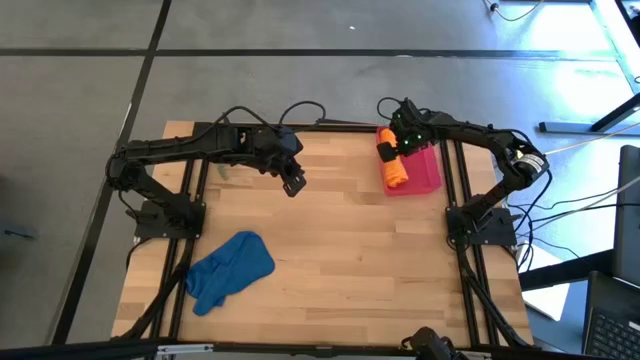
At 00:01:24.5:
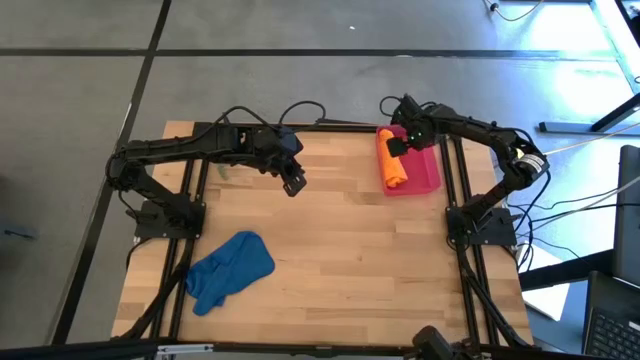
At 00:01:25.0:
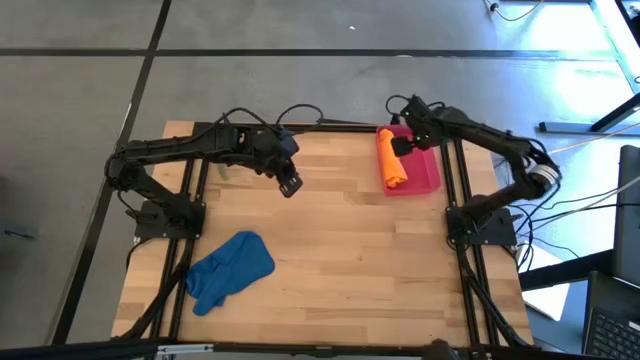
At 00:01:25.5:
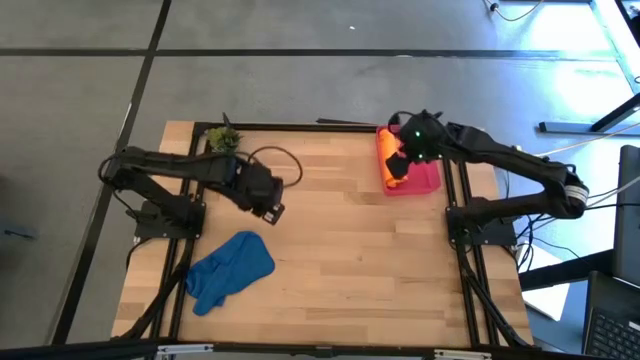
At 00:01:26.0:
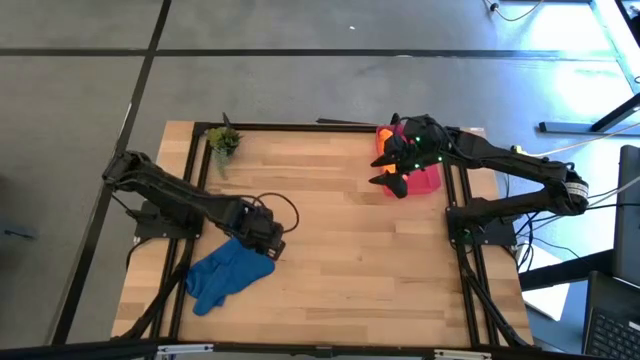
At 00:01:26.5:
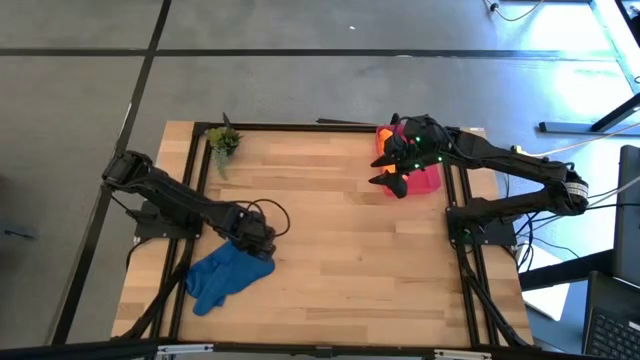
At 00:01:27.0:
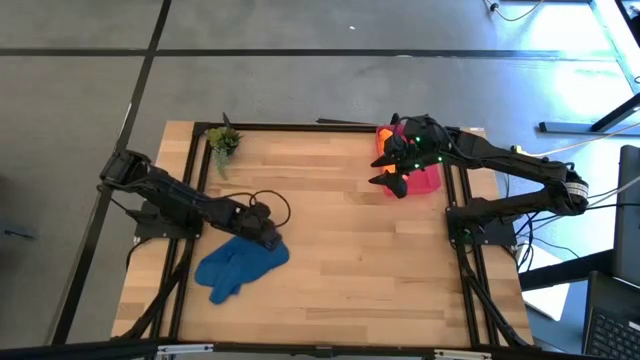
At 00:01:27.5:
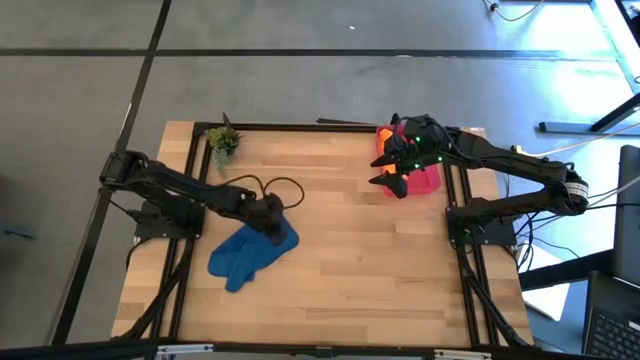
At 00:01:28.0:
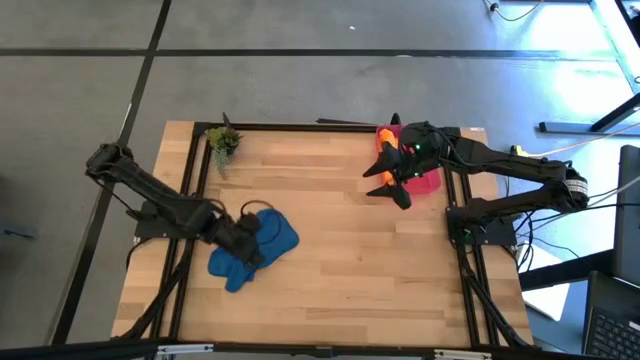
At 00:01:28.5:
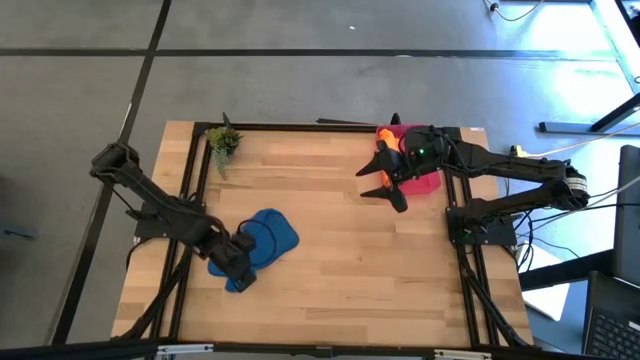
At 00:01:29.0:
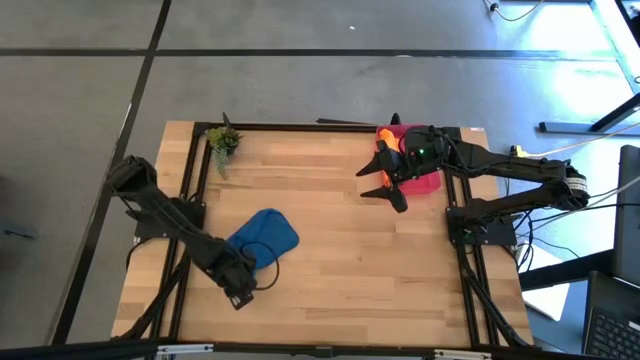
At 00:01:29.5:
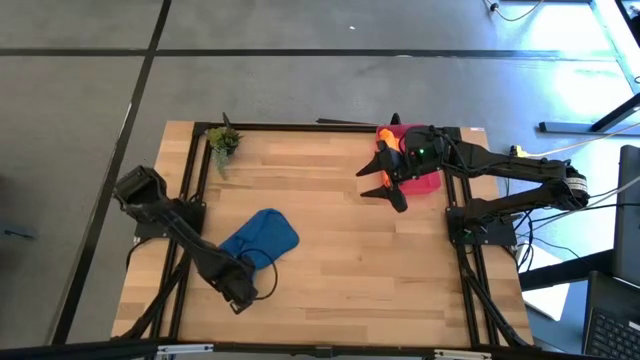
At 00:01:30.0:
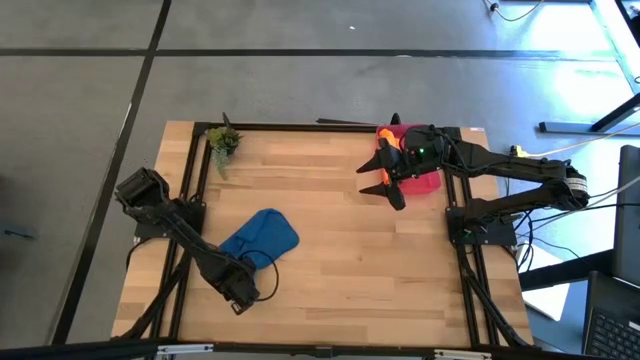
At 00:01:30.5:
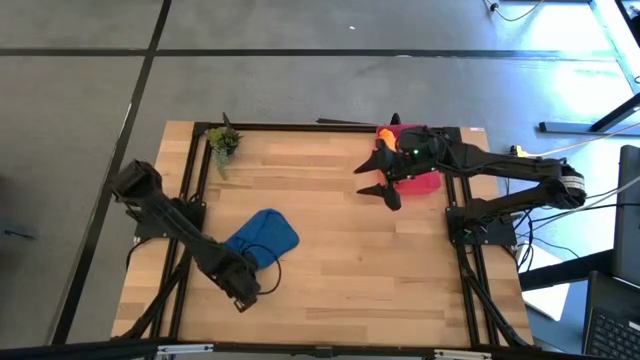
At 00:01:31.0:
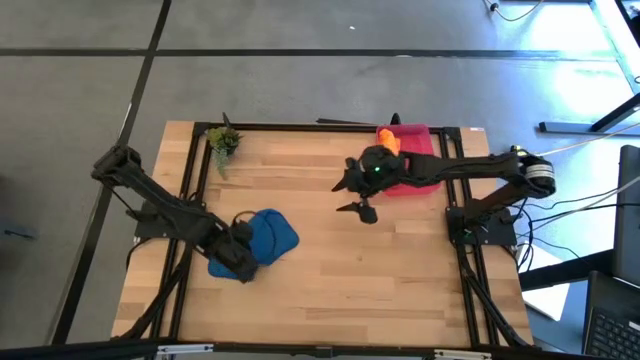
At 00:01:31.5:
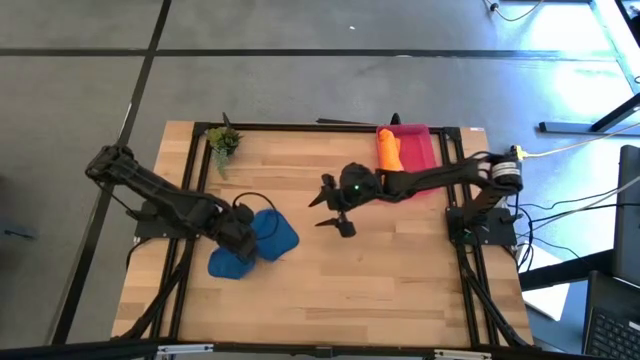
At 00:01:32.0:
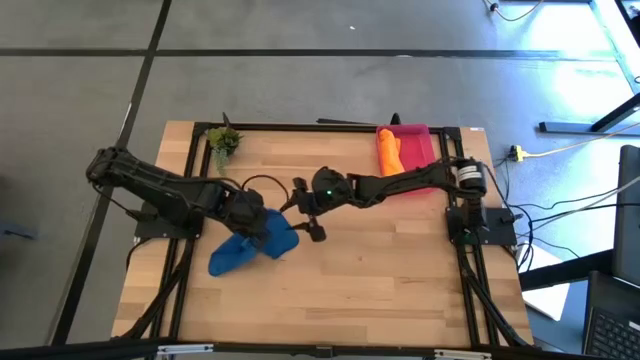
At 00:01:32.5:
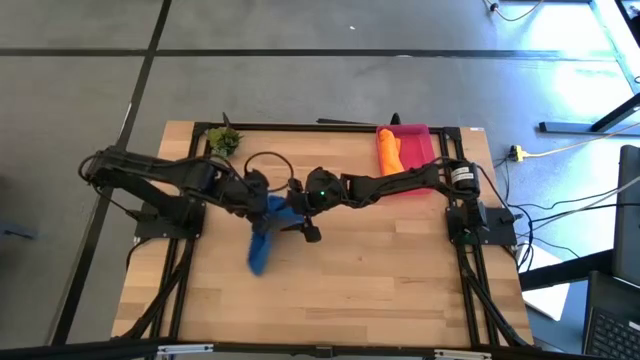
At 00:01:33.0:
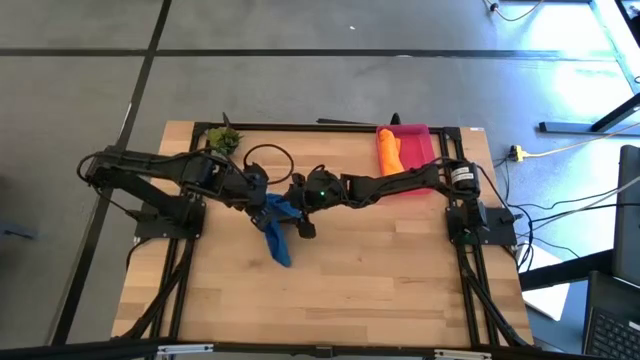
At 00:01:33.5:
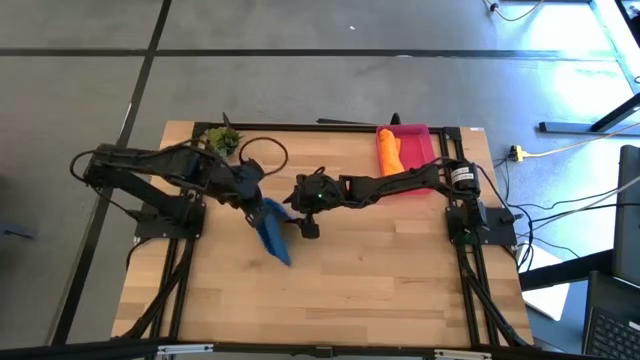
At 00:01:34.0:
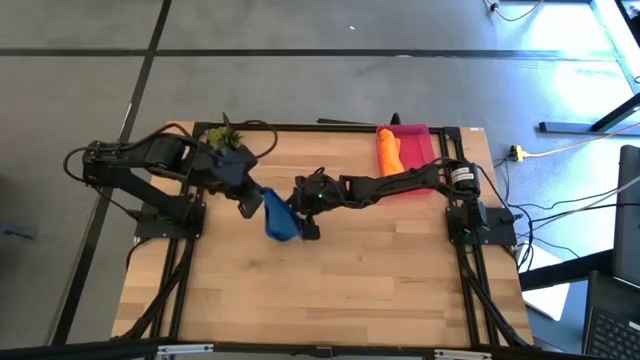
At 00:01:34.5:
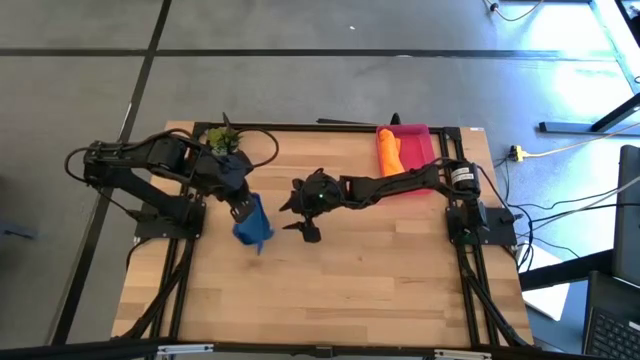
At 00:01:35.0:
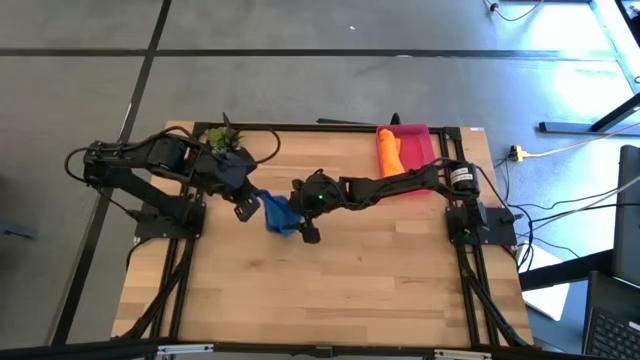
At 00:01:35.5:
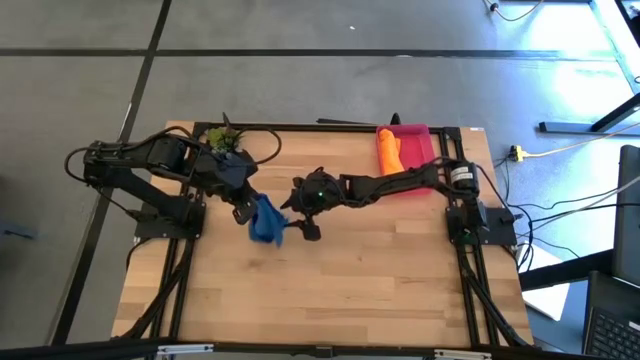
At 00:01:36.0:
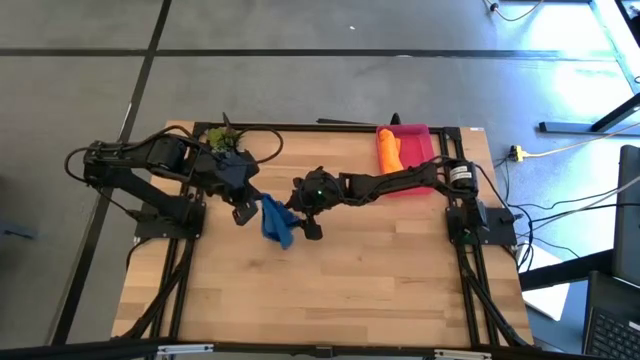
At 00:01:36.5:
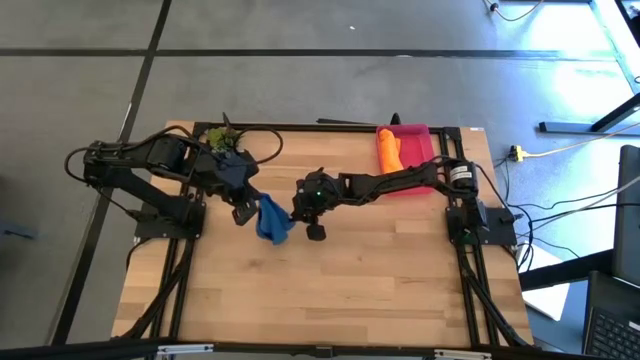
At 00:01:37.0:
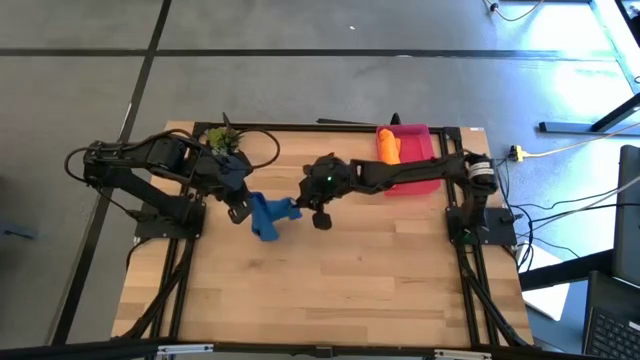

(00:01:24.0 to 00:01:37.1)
Task: Roll microfiber towels into tight, uniform cylinder then place into a basket
Fold the blue microfiber towel

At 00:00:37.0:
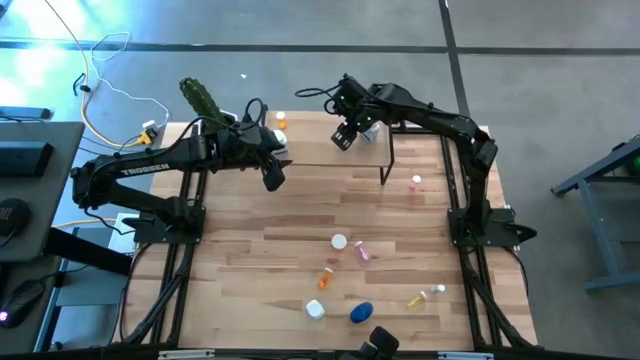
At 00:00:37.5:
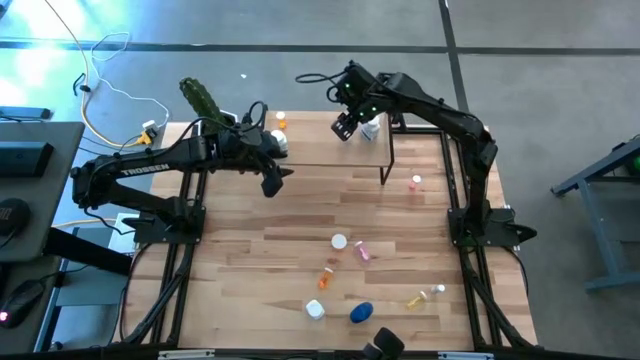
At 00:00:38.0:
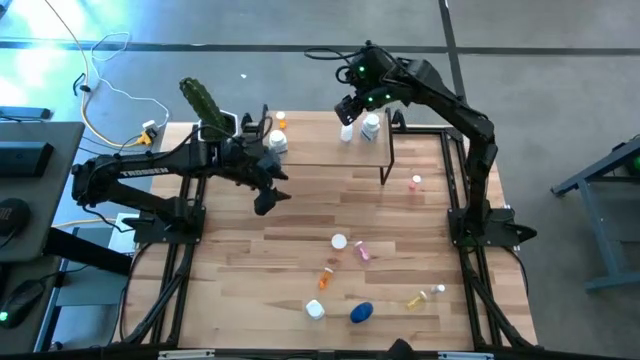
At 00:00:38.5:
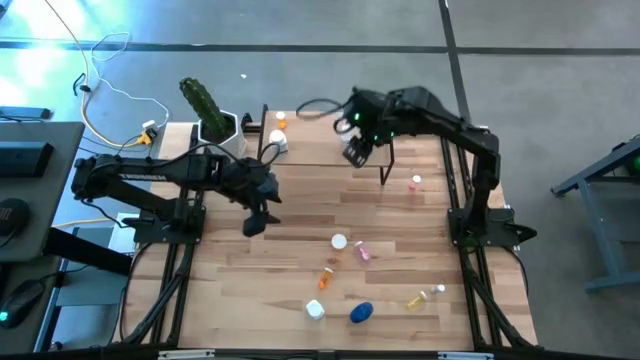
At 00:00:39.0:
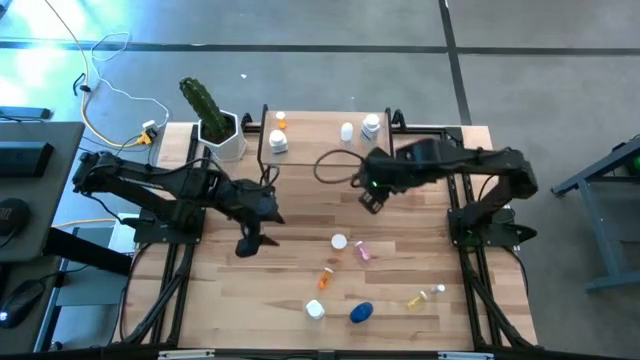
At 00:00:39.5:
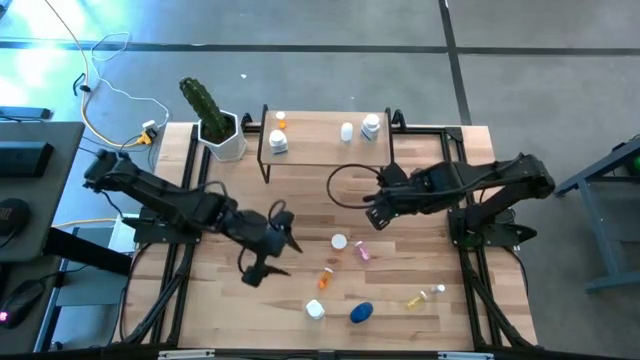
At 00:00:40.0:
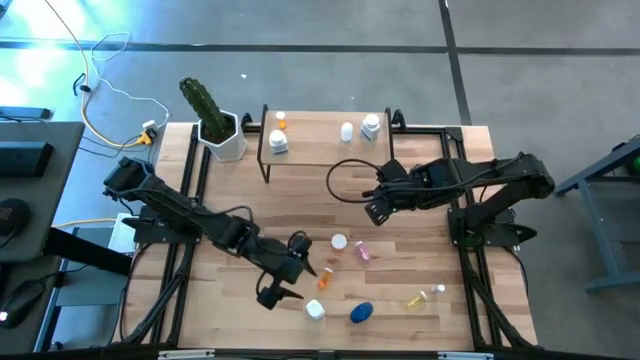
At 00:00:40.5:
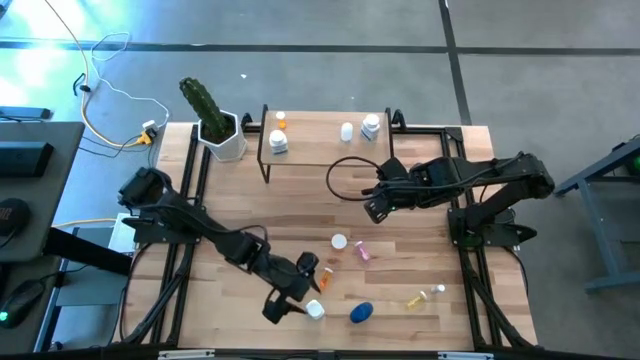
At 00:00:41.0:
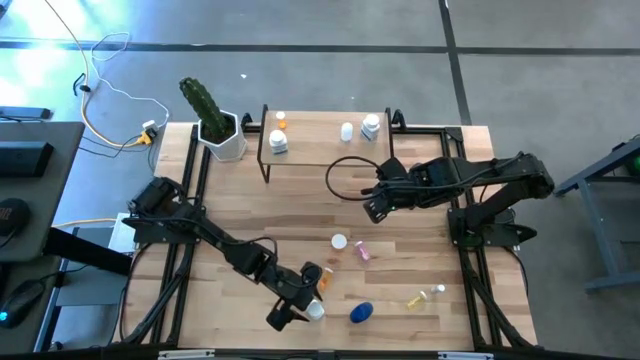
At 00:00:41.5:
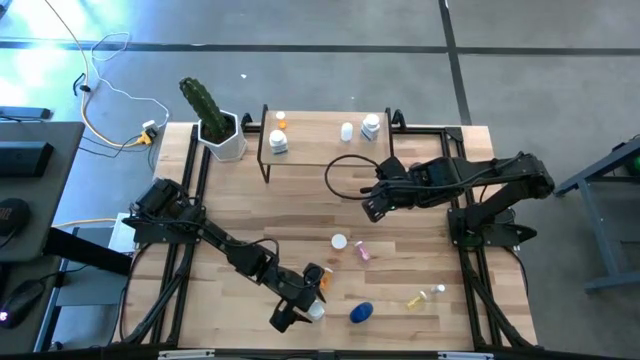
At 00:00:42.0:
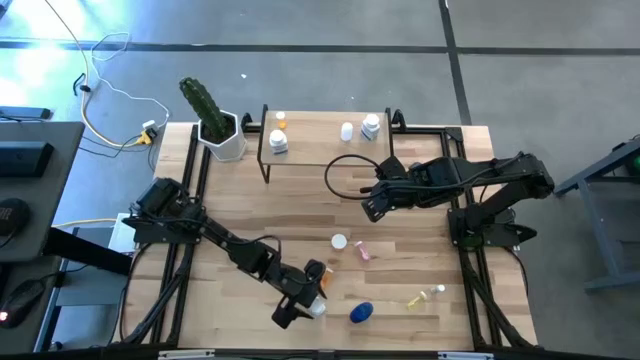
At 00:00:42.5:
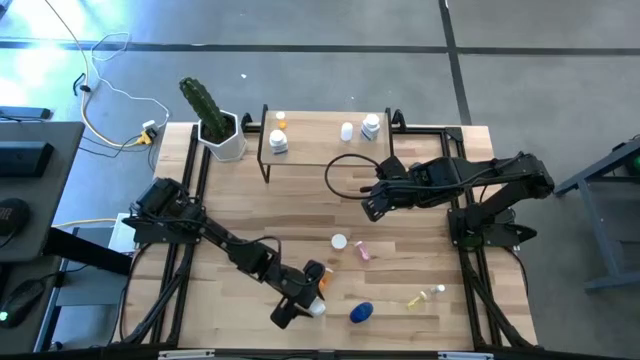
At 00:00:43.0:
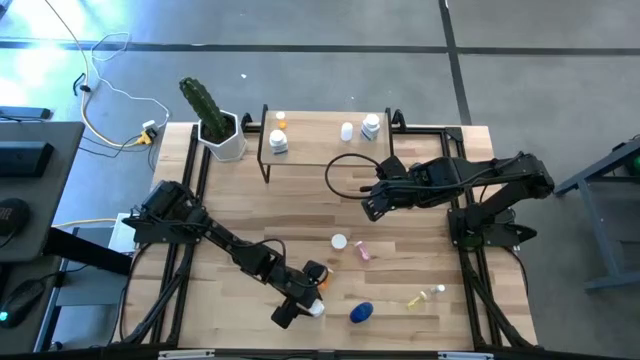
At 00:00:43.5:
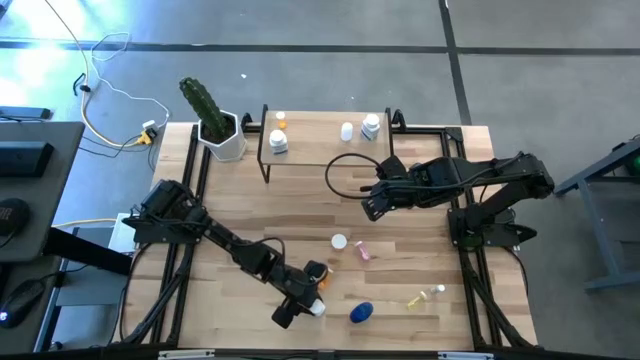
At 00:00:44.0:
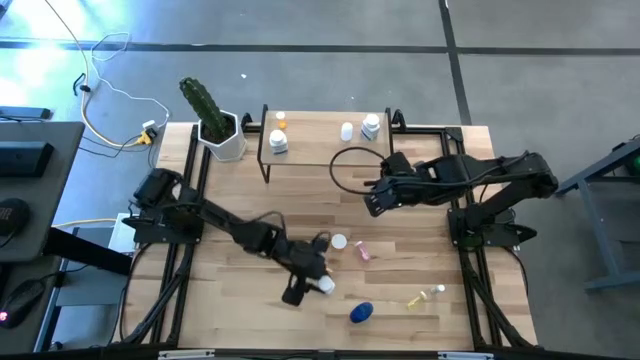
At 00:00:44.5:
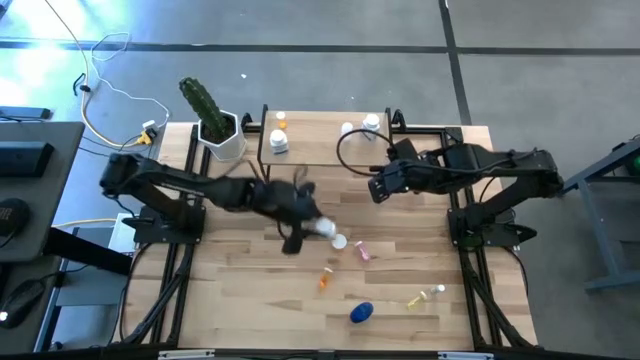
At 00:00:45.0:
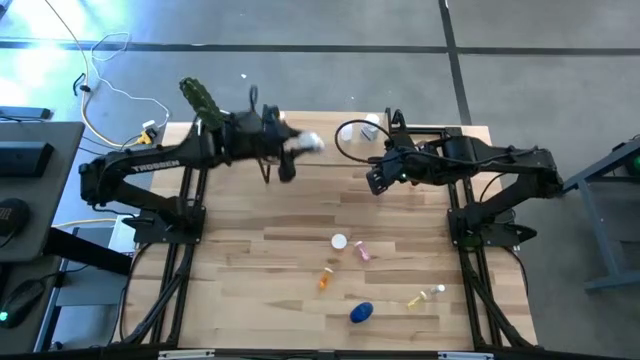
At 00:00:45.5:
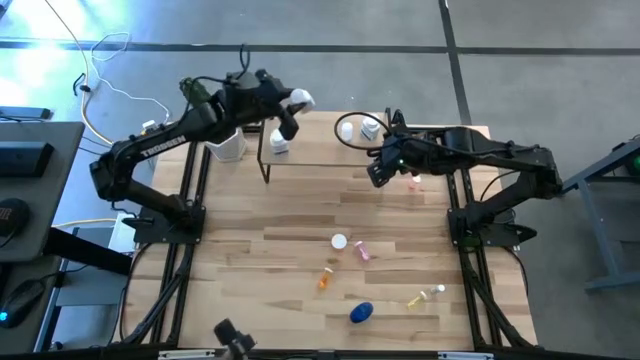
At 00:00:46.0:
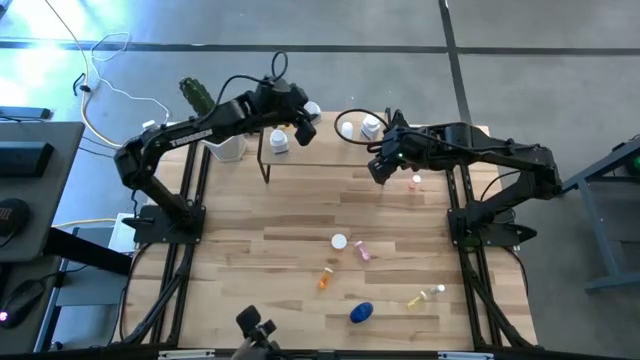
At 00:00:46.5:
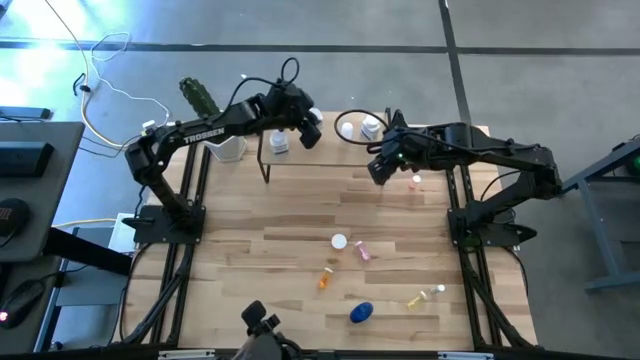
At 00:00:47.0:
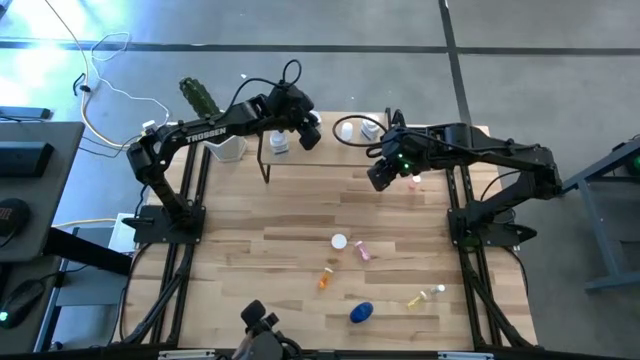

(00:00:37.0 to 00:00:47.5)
Task: Pick and place medicine bottles onto shelf by color
Put the white blue pill bottle on the shelf
